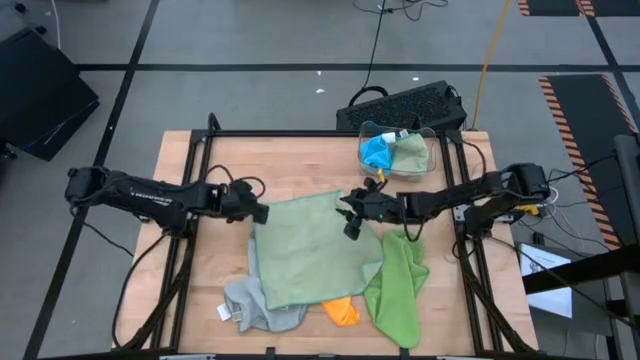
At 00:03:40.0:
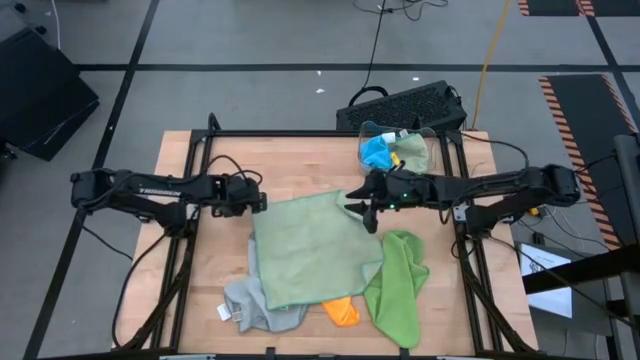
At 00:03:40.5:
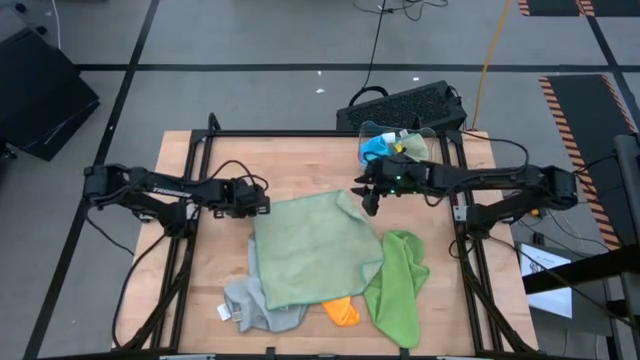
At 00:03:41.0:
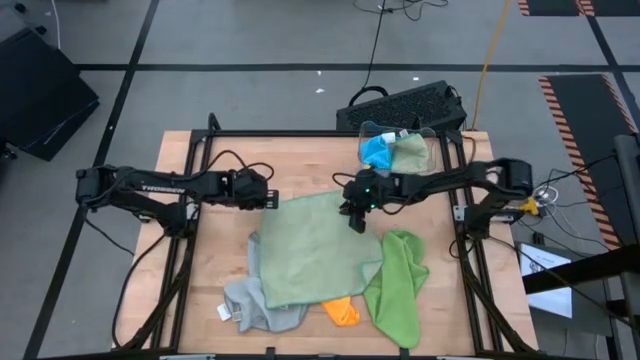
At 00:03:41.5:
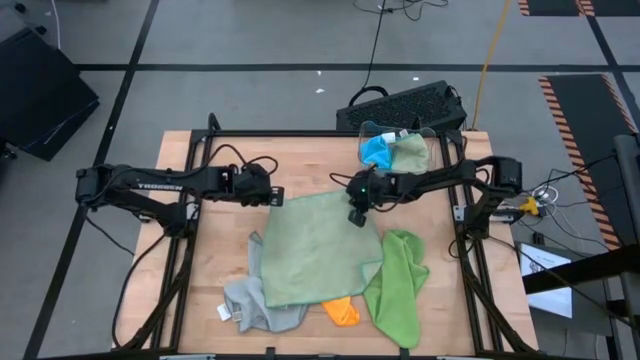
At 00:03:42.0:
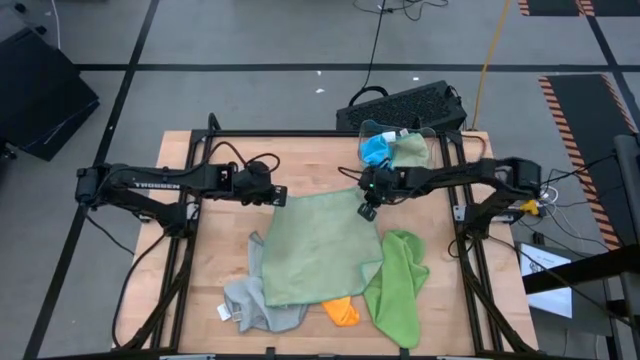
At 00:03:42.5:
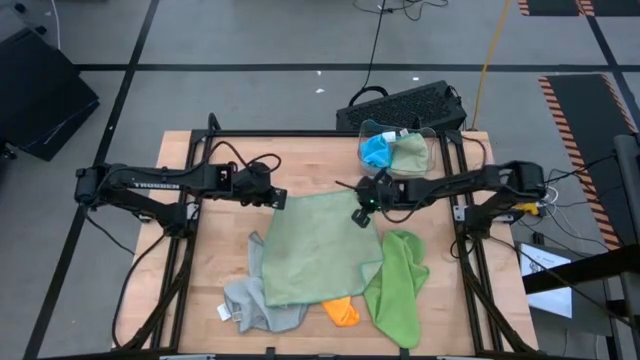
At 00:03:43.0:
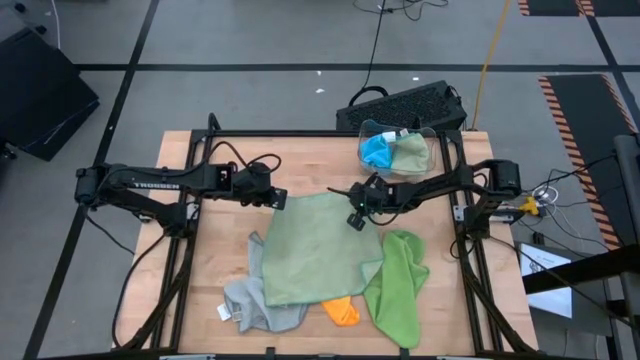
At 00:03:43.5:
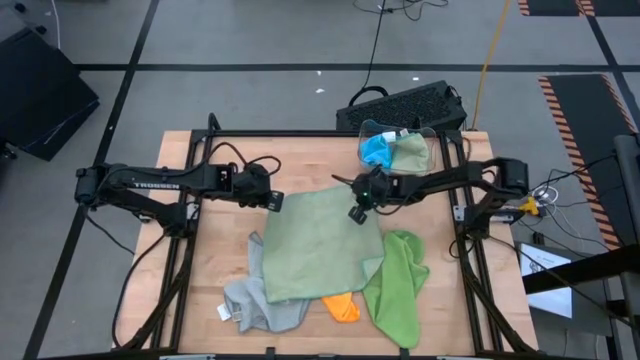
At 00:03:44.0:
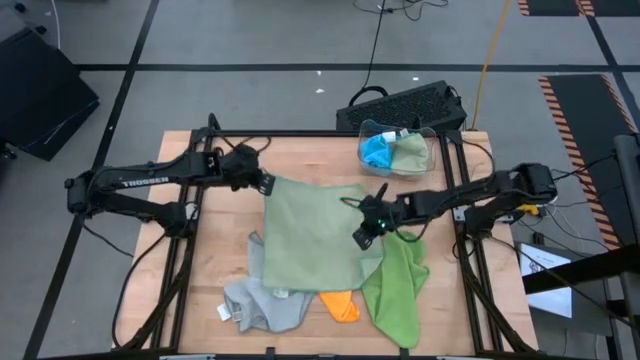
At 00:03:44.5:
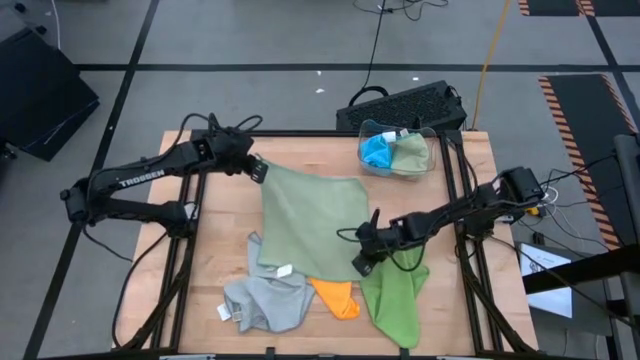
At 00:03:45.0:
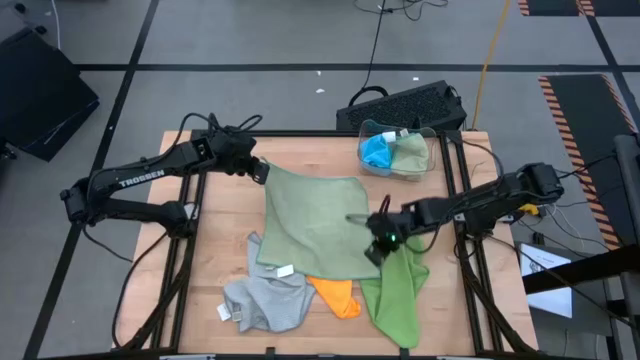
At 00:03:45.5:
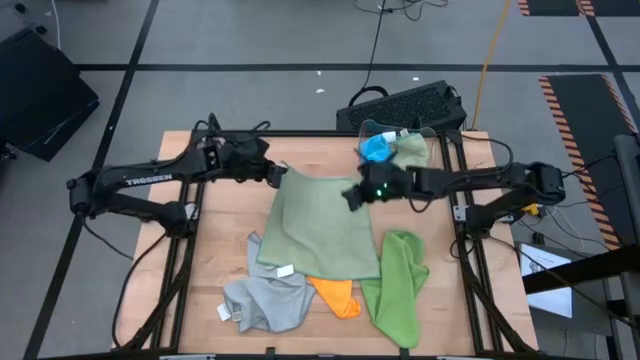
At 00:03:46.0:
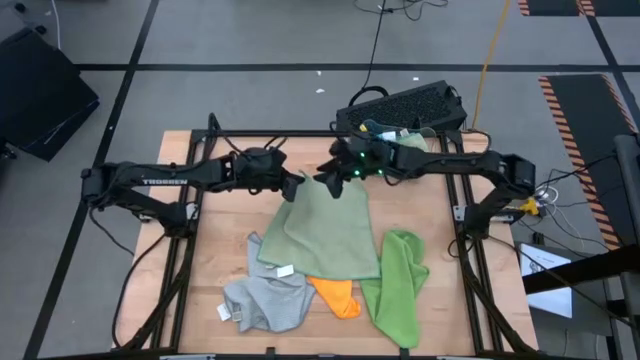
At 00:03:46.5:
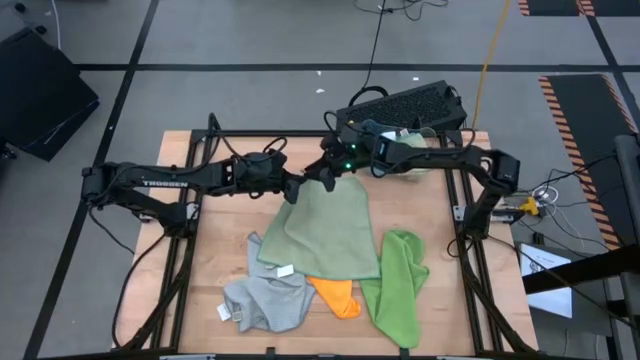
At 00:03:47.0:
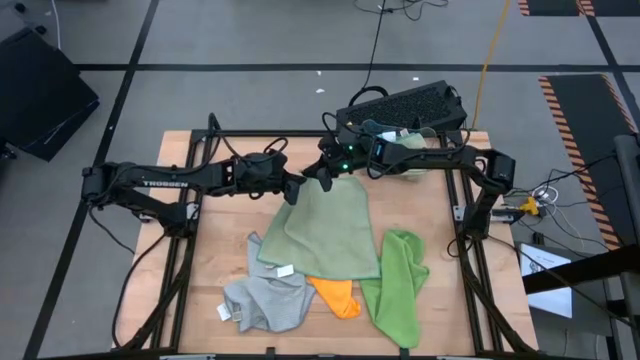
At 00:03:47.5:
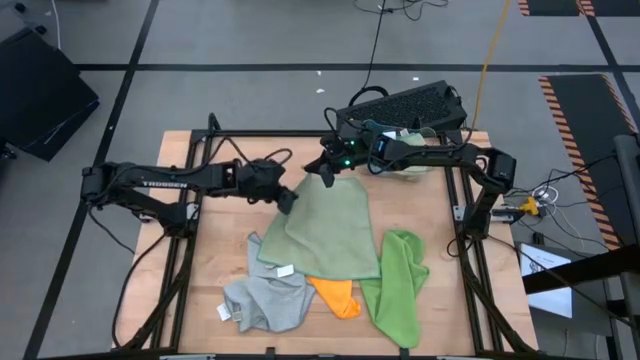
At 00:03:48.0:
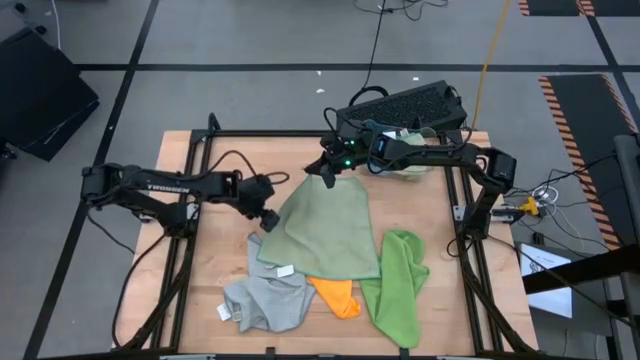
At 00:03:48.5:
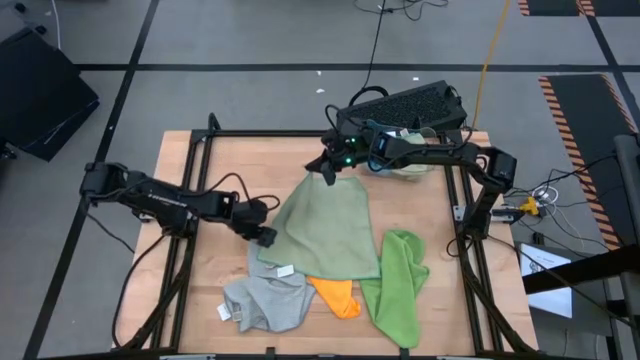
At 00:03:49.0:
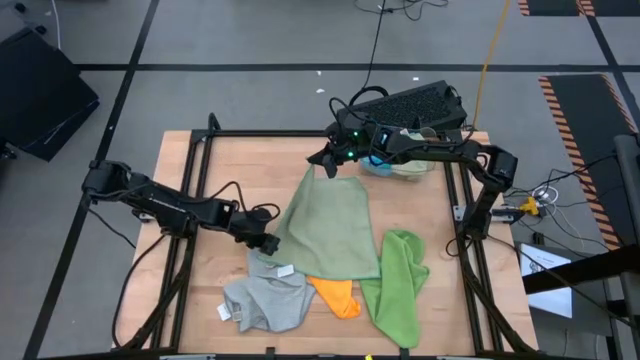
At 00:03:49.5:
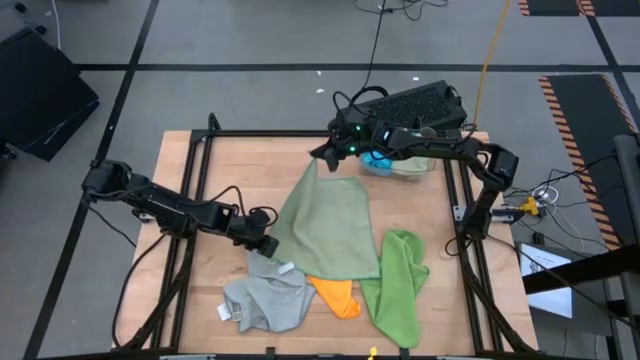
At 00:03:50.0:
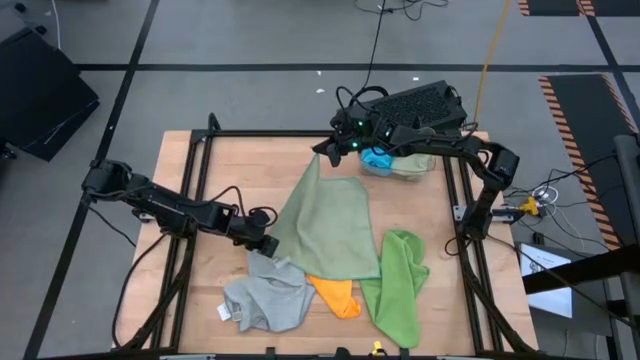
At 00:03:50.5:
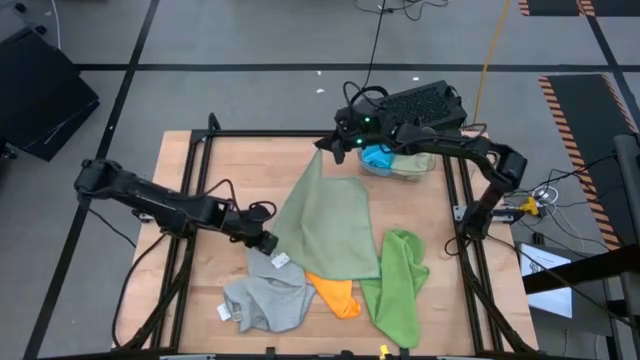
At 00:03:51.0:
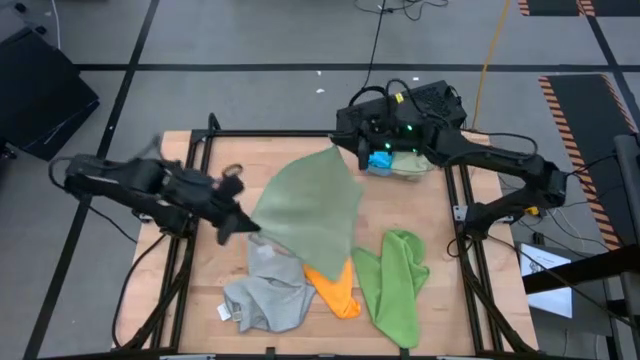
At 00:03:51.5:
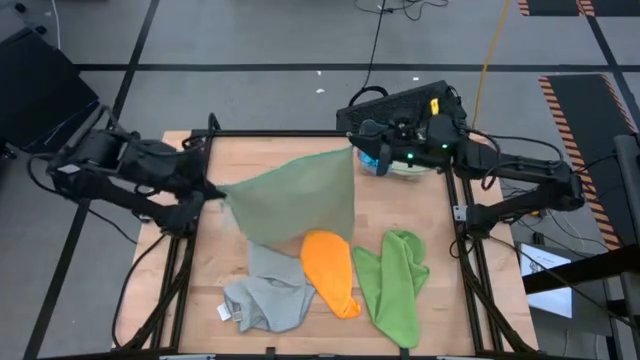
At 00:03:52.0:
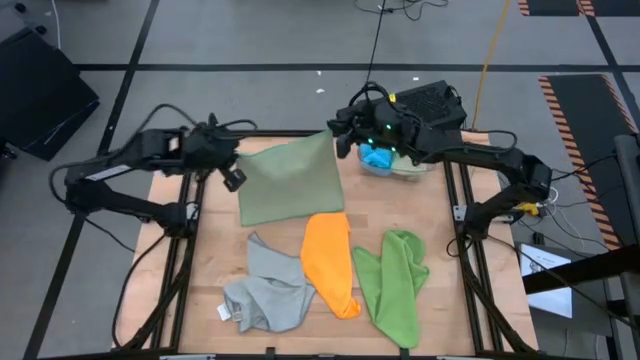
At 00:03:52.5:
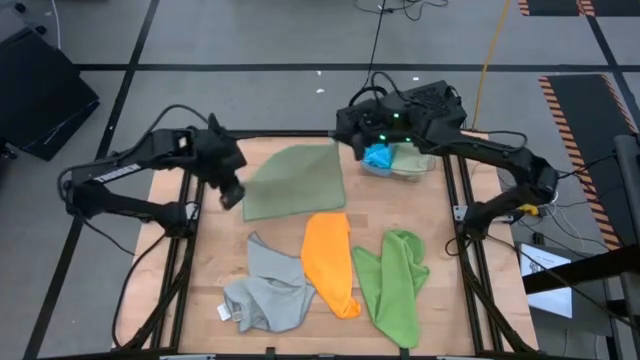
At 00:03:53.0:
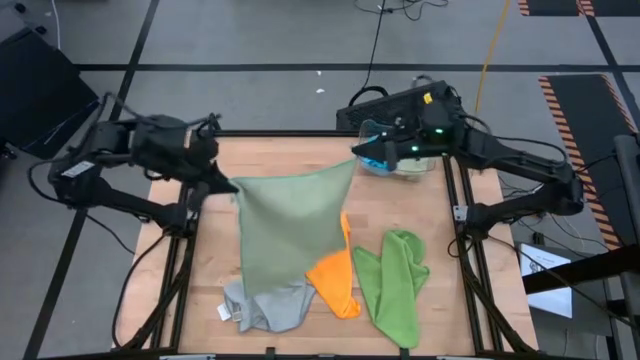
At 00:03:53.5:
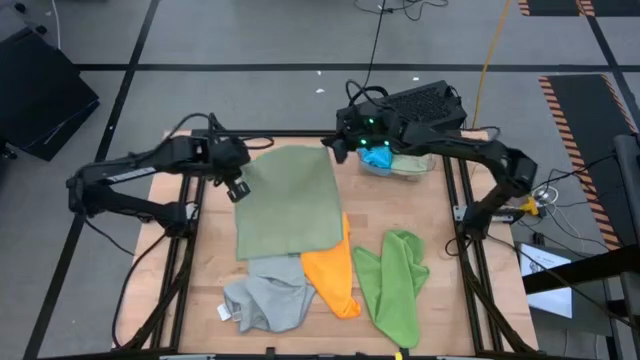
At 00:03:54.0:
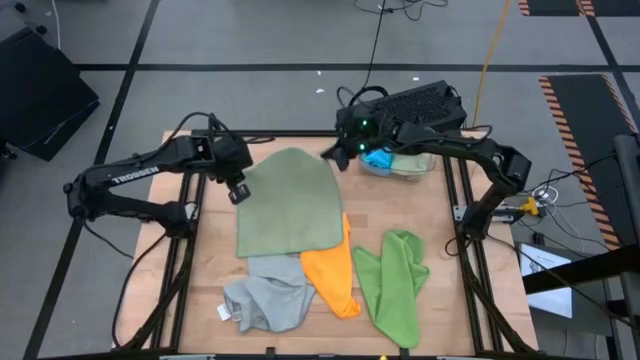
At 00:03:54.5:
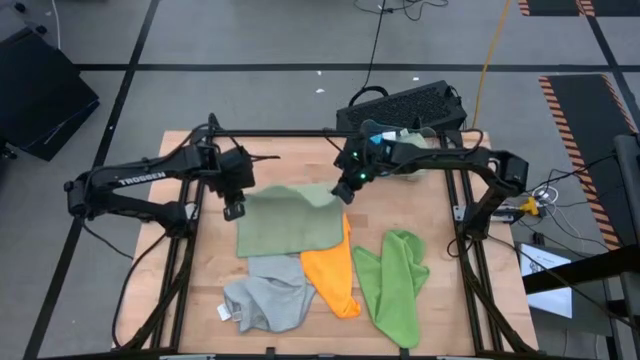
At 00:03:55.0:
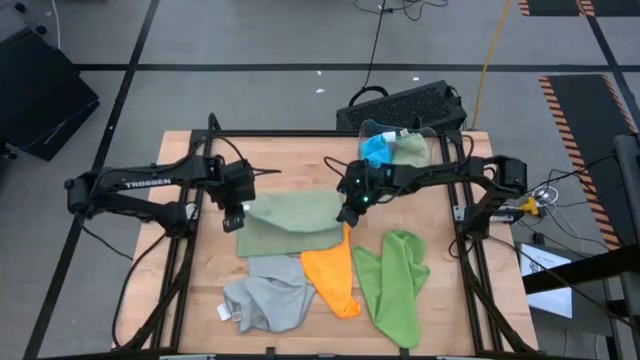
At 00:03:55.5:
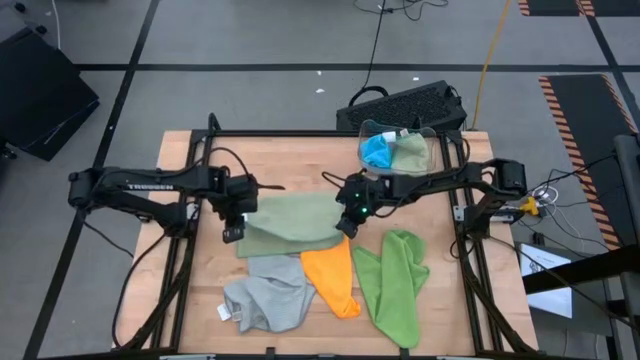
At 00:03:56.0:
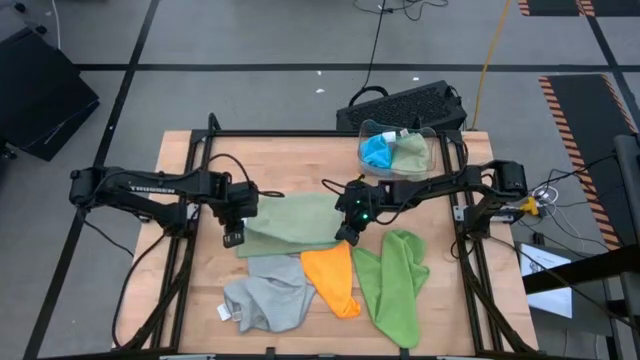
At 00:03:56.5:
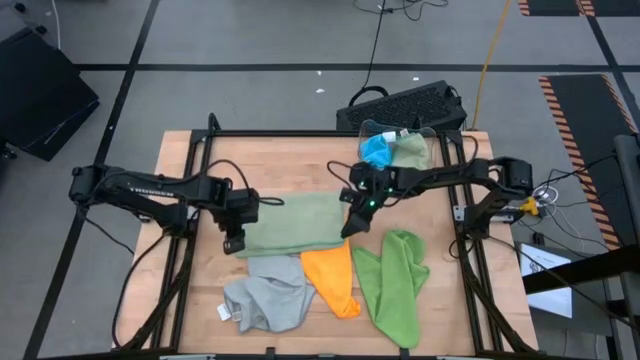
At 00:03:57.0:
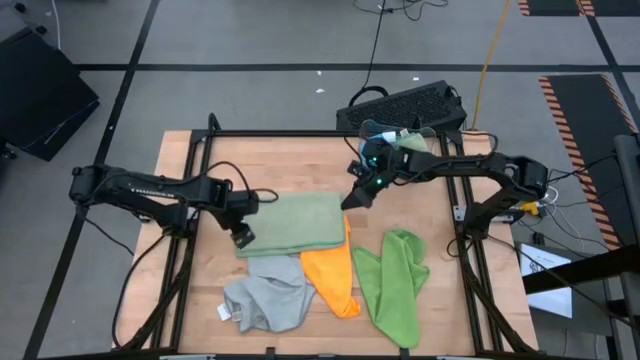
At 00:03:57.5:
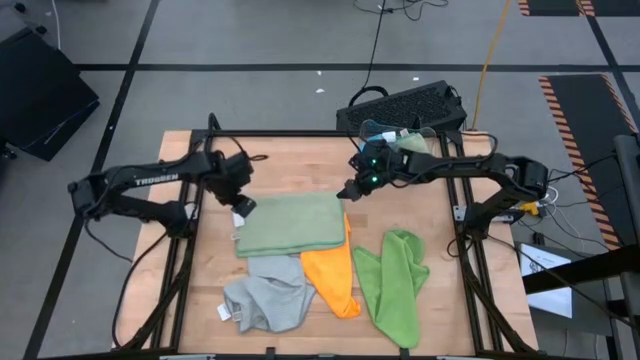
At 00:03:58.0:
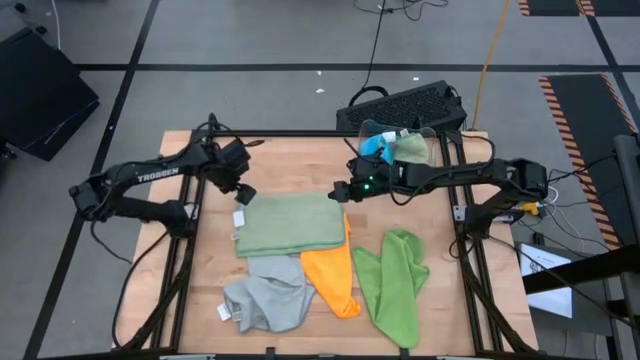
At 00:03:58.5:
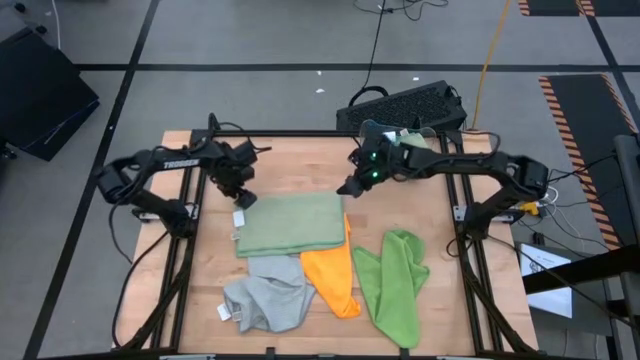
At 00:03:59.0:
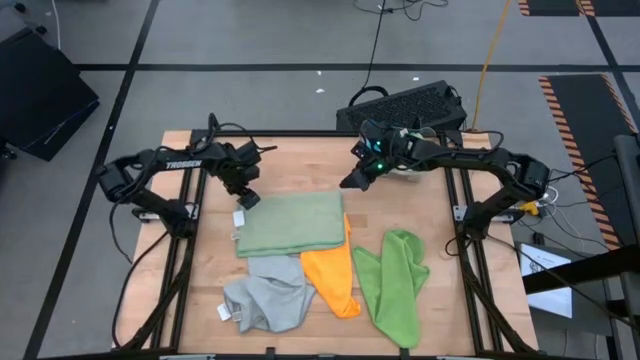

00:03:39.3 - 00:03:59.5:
Task: Fold microfiber towels
Fold the light green microfiber towel
